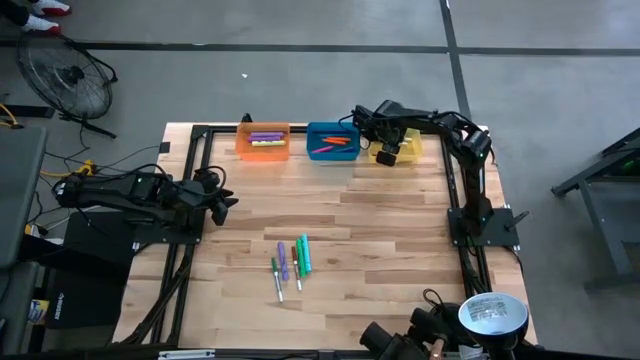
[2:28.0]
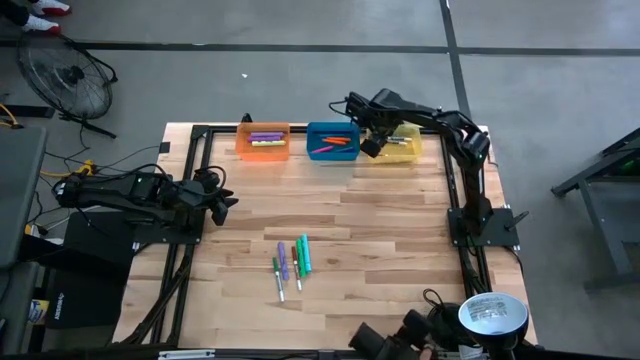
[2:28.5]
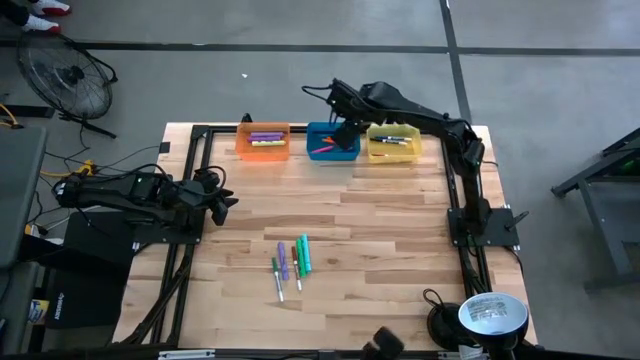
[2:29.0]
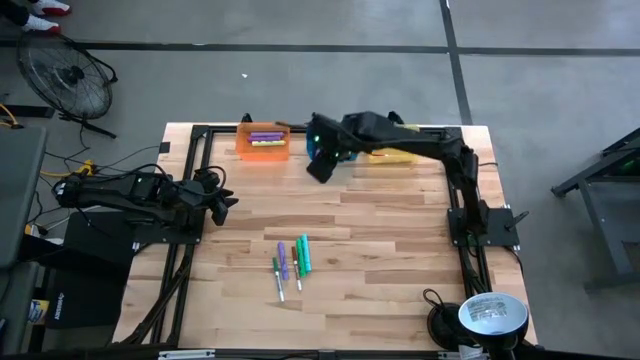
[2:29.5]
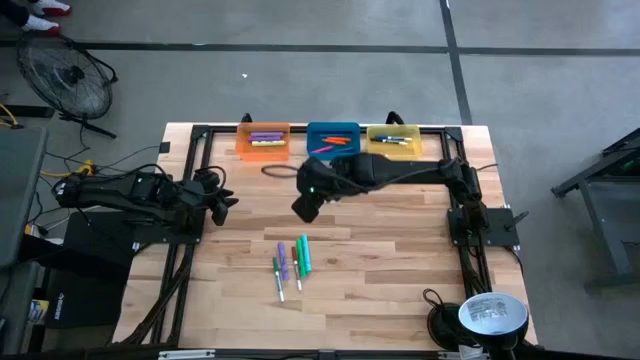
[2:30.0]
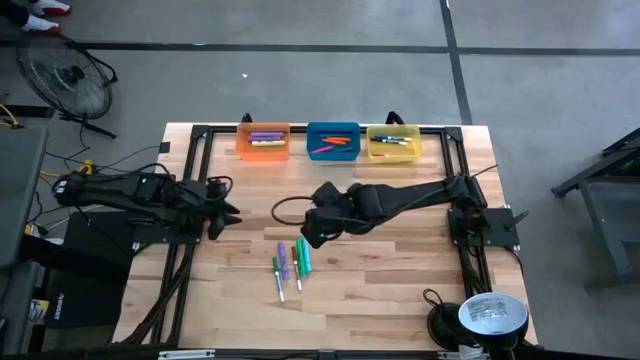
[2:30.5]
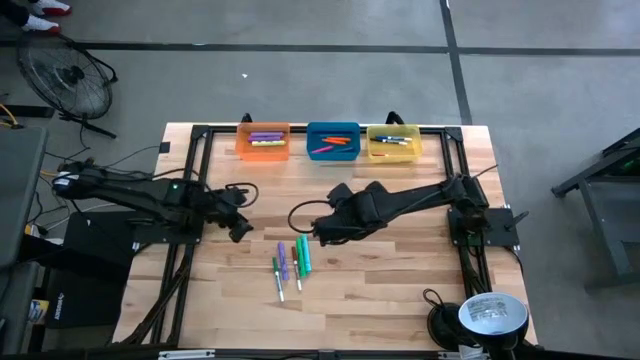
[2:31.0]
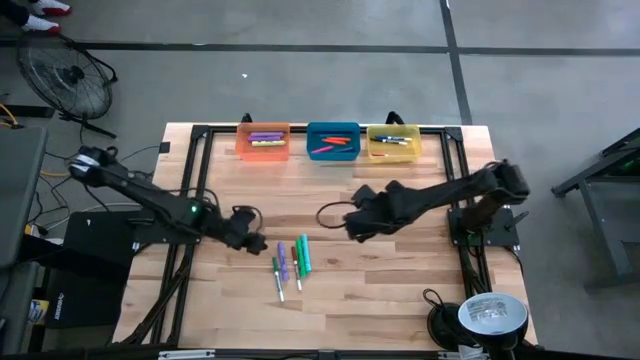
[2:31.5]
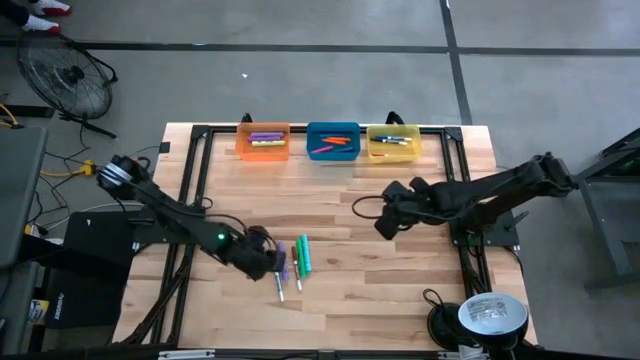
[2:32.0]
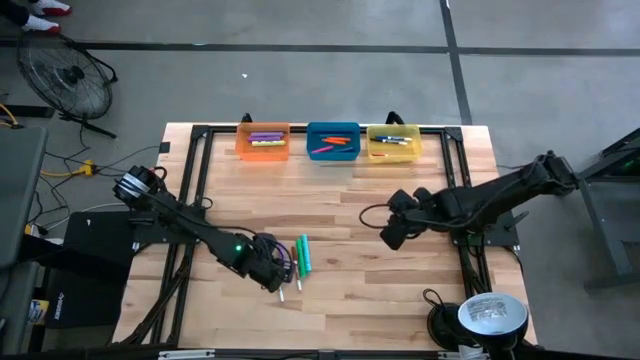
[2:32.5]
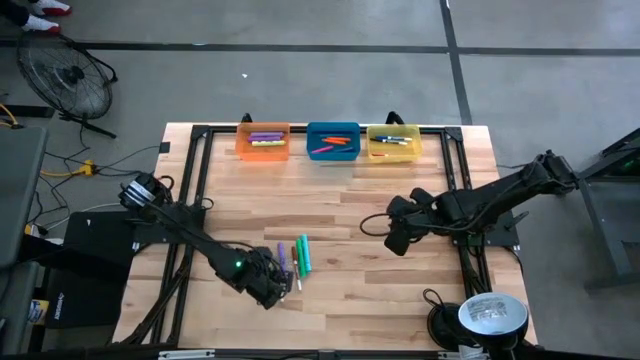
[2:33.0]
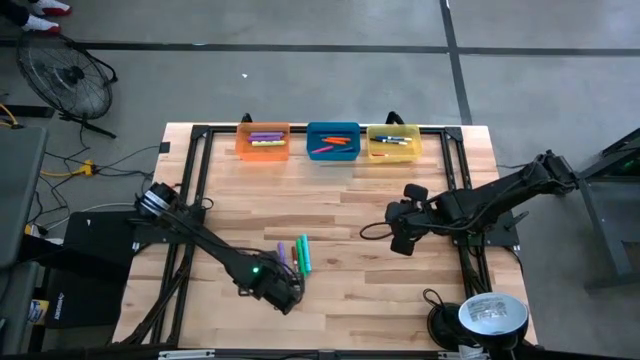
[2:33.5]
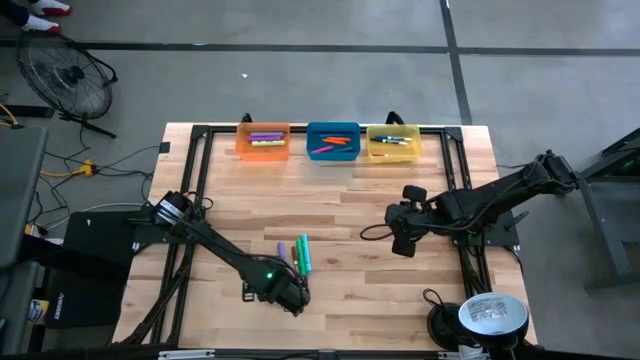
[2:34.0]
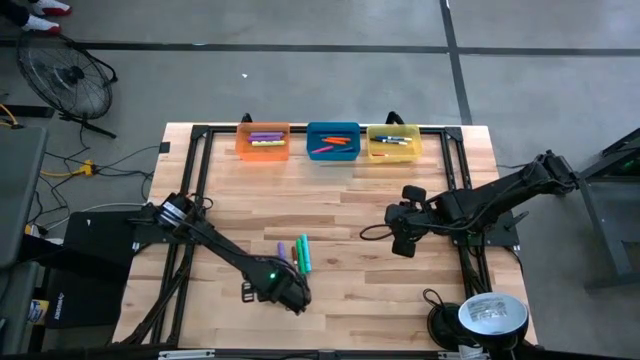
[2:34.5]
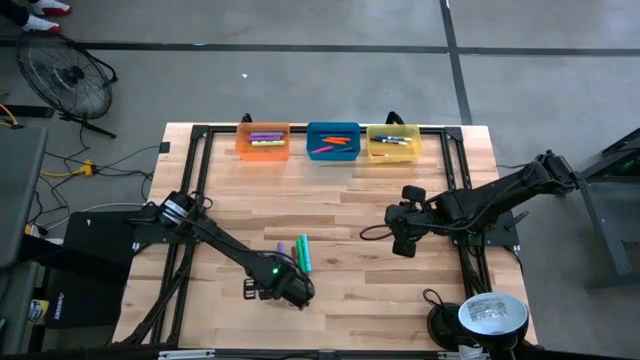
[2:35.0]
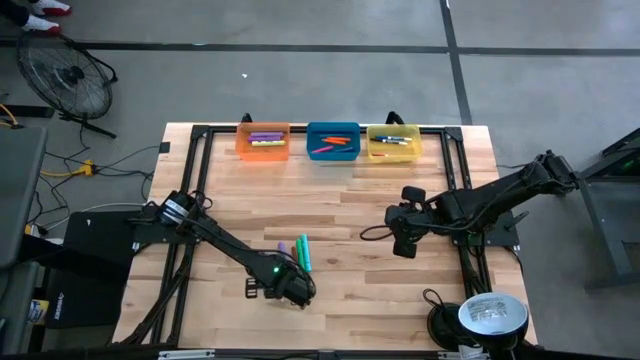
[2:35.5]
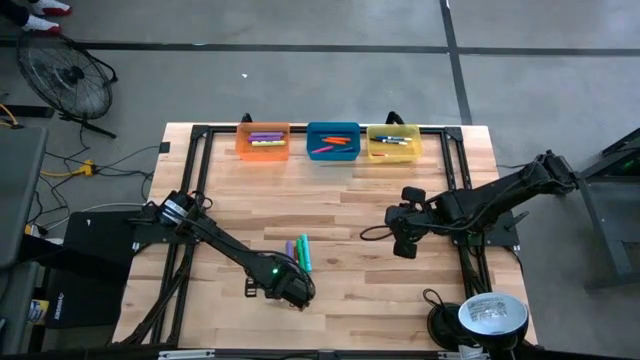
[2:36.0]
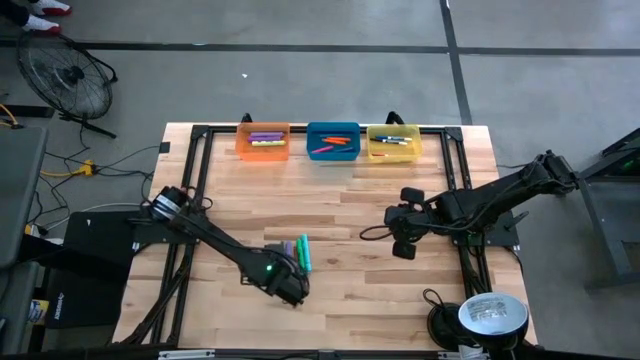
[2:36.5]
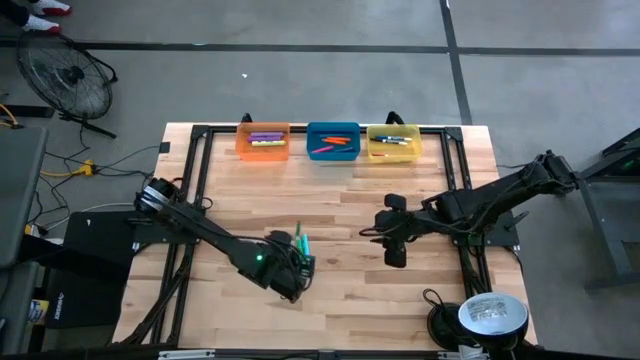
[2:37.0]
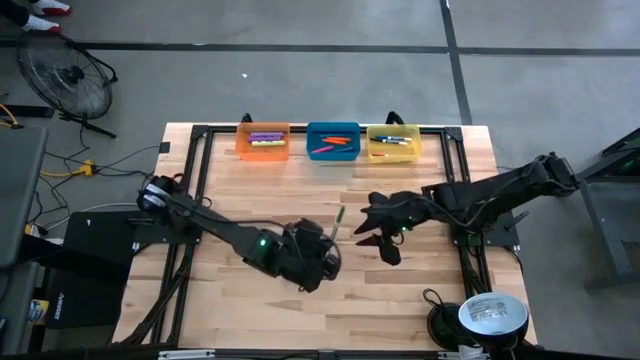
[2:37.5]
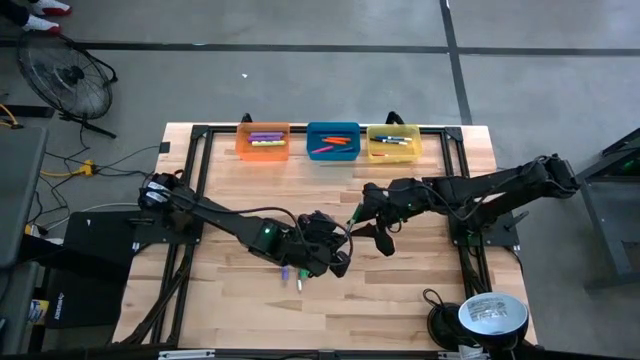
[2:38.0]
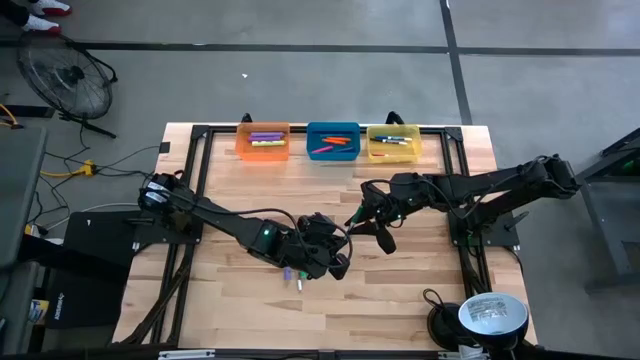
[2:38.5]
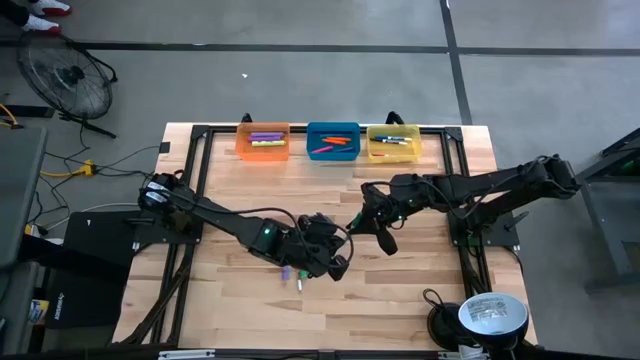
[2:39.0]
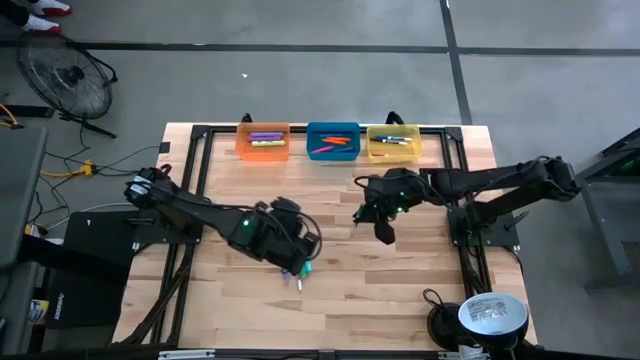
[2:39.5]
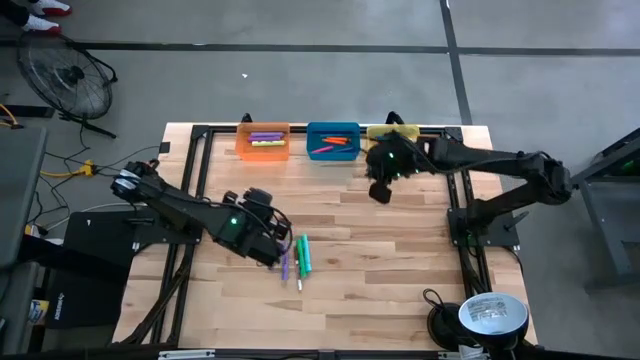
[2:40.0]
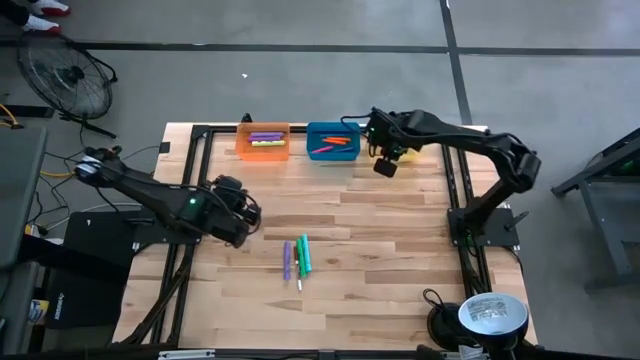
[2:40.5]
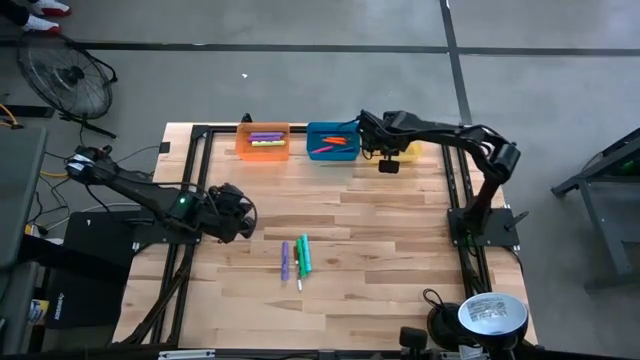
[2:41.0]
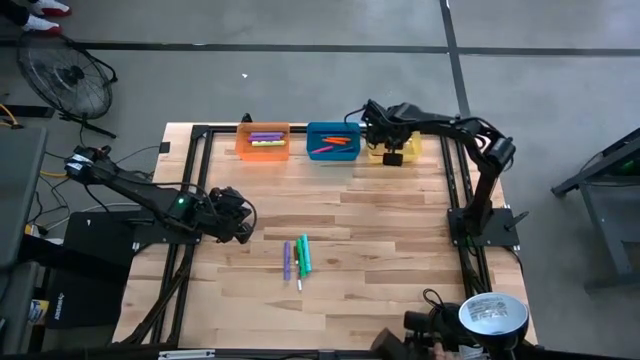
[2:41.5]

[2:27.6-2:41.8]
Task: Pick & Place Markers
Put the green marker into the yellow bin

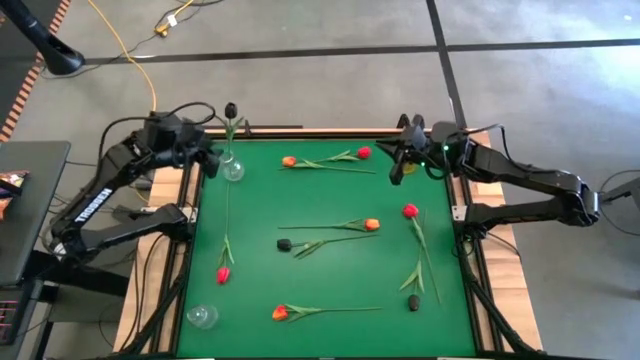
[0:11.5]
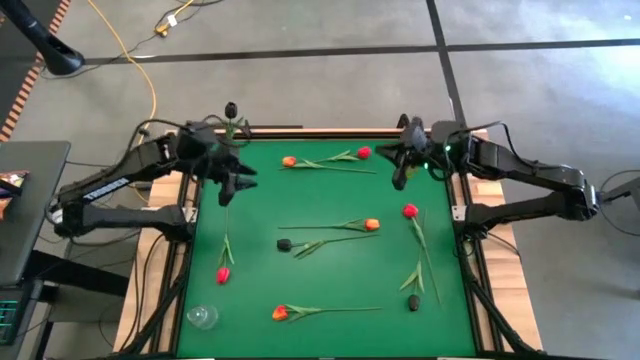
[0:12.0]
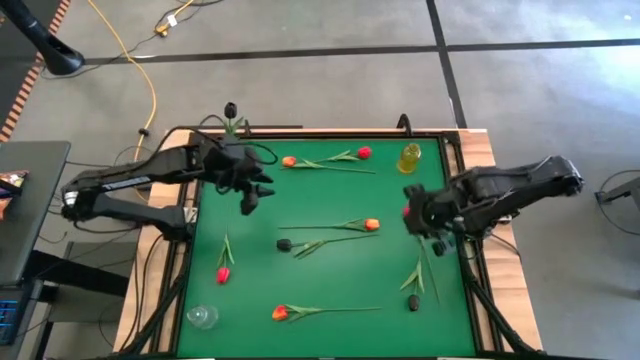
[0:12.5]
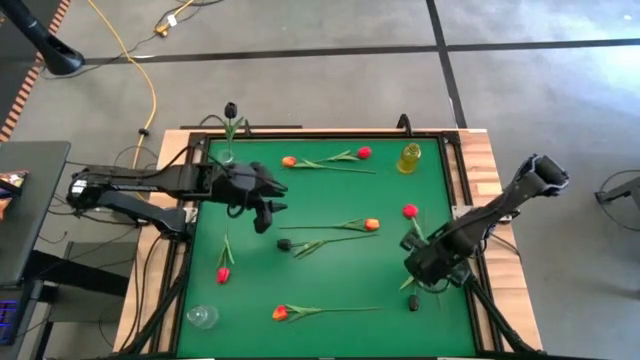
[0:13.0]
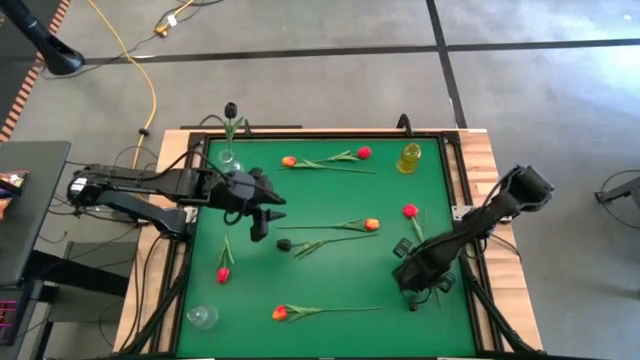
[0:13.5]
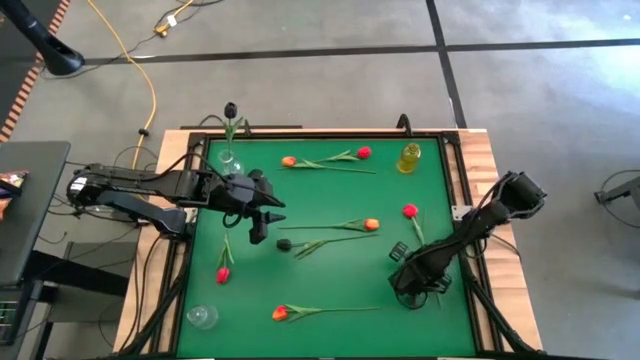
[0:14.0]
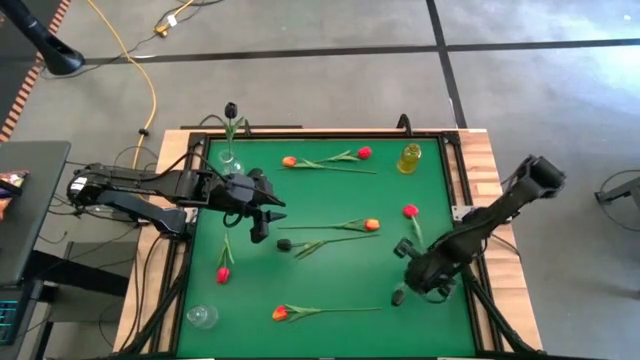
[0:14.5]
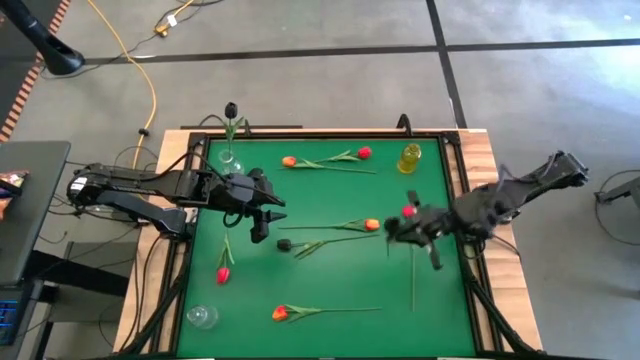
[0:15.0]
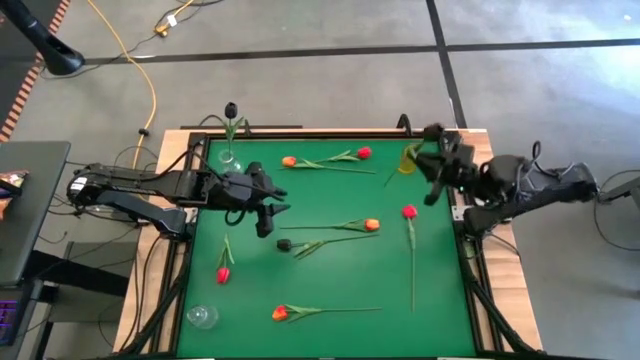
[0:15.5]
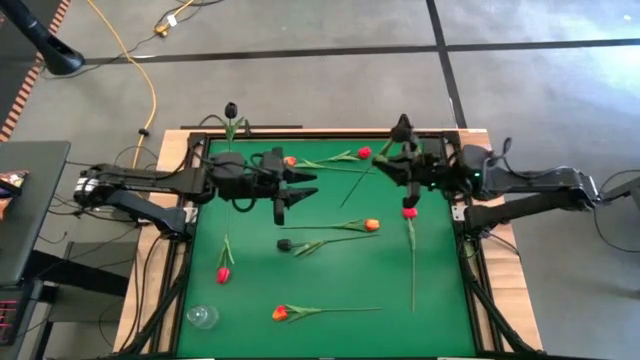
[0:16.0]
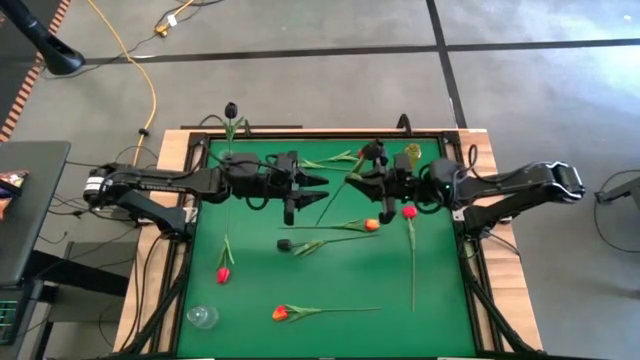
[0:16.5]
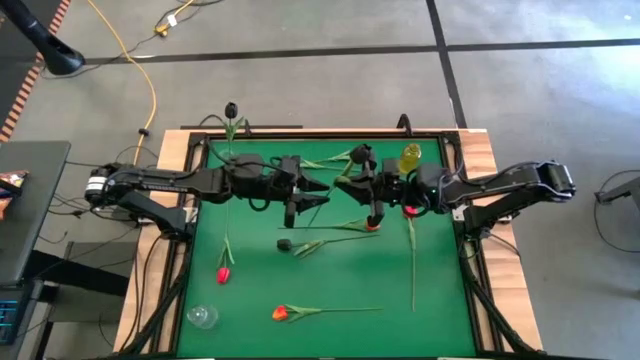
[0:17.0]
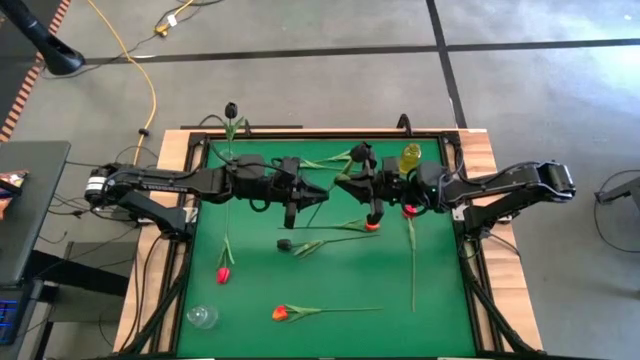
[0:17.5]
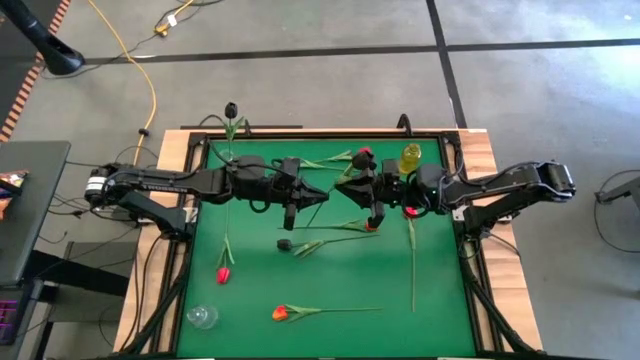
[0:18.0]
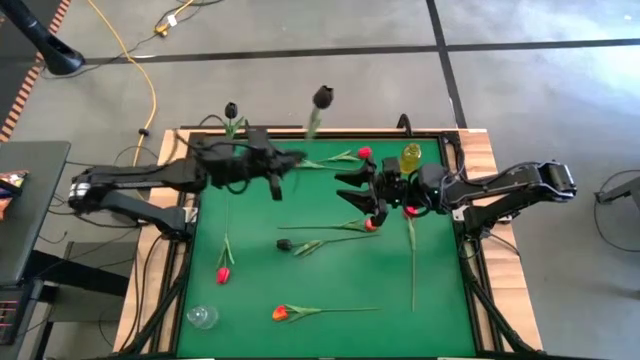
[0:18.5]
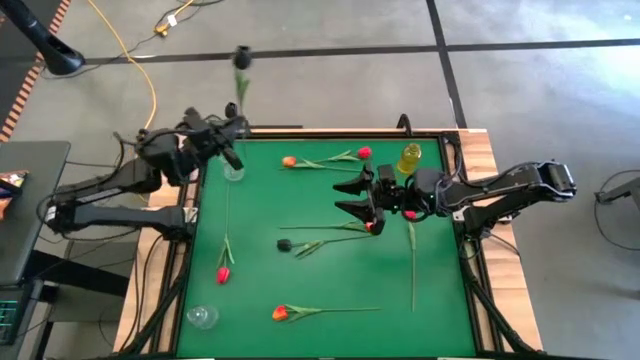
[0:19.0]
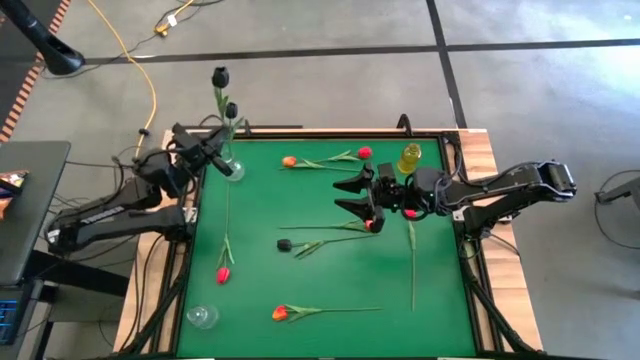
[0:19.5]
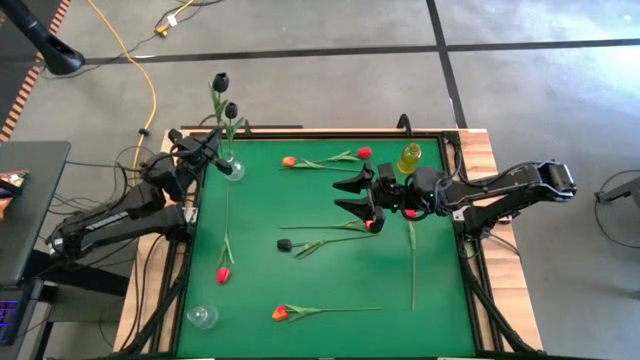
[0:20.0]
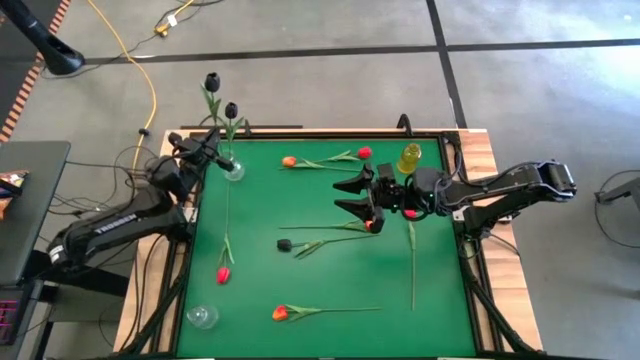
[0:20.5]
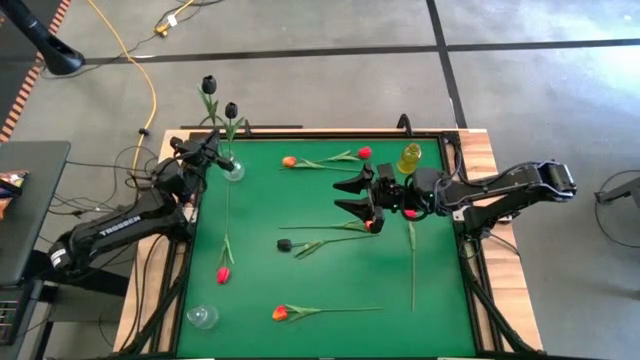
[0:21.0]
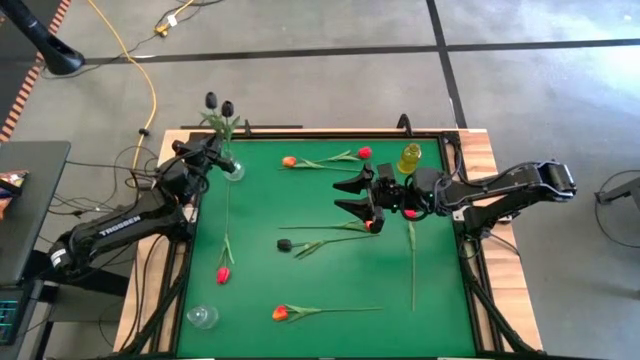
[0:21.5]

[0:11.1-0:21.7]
Task: Sort flowers into vase by color
Put the bottom black flower into the top transparent vase
